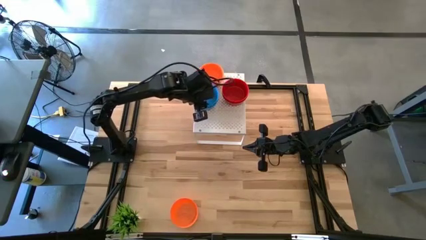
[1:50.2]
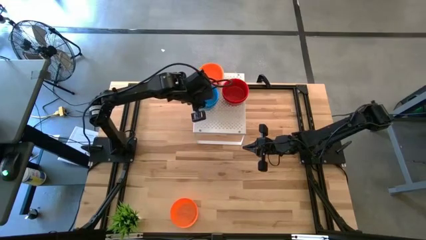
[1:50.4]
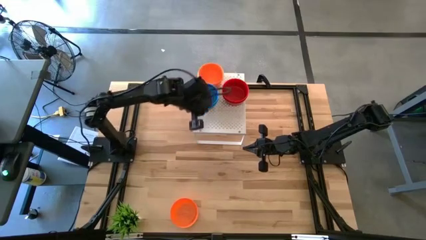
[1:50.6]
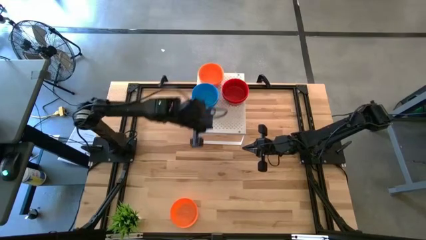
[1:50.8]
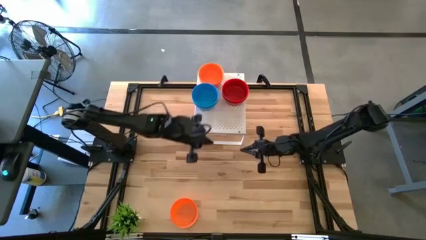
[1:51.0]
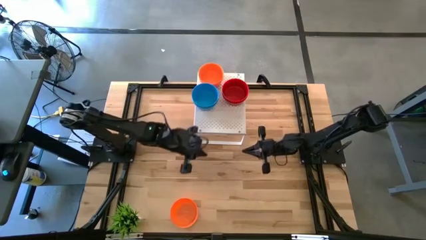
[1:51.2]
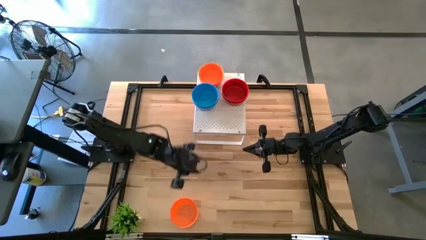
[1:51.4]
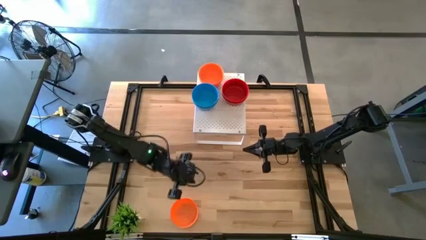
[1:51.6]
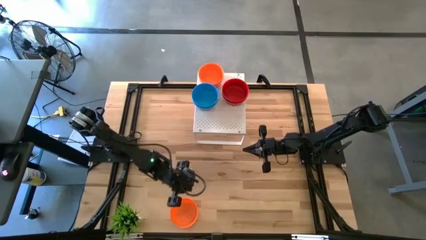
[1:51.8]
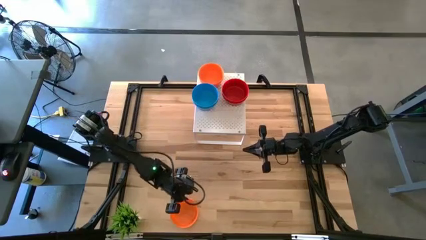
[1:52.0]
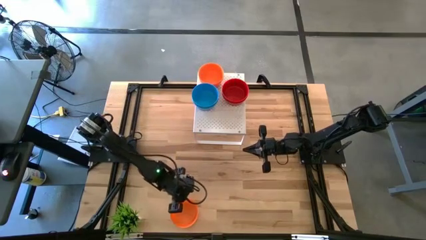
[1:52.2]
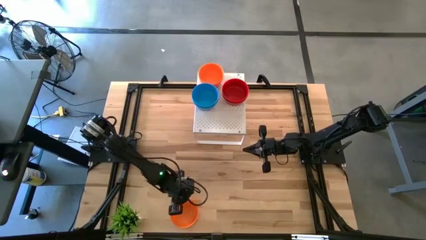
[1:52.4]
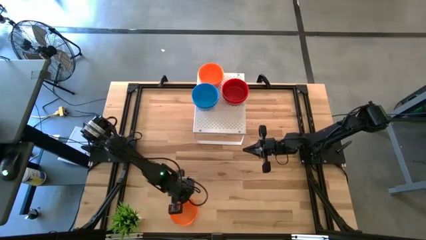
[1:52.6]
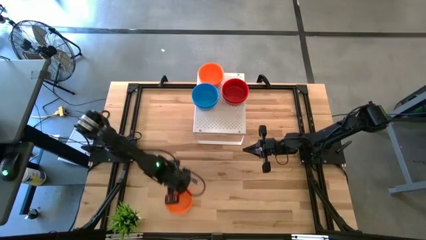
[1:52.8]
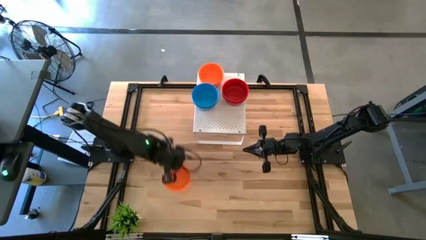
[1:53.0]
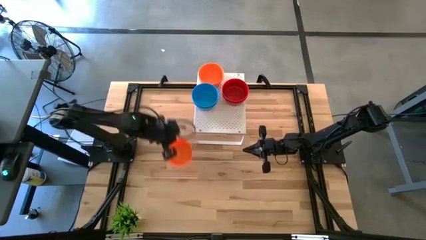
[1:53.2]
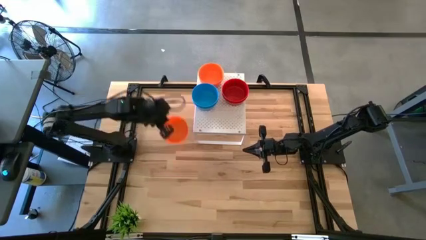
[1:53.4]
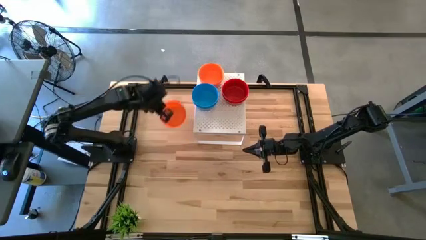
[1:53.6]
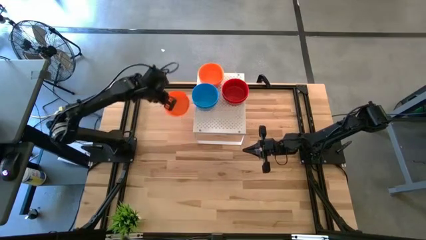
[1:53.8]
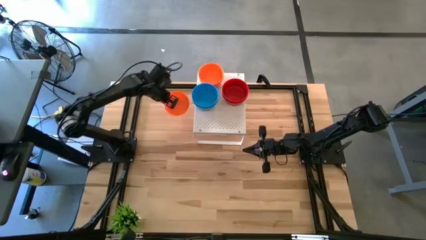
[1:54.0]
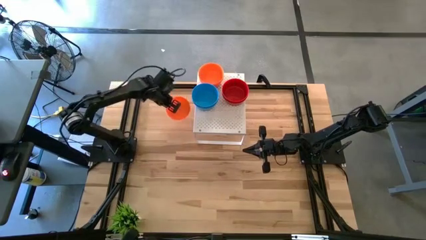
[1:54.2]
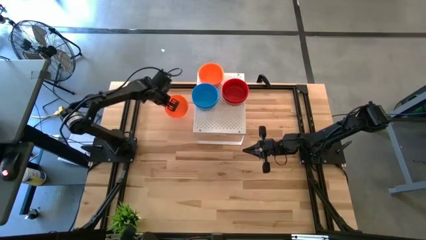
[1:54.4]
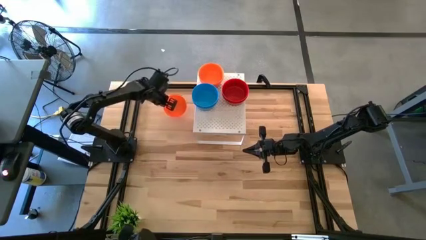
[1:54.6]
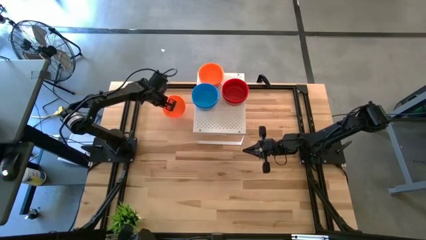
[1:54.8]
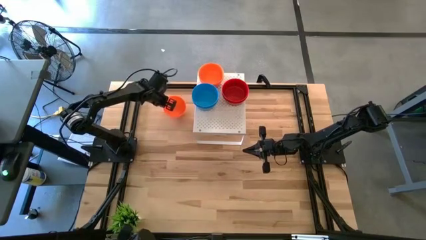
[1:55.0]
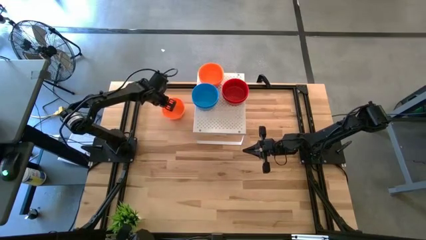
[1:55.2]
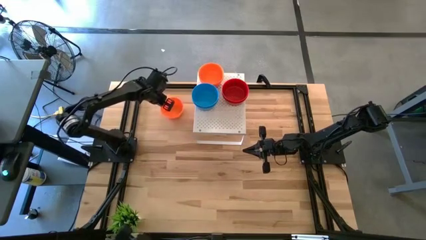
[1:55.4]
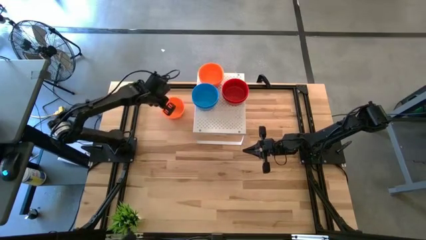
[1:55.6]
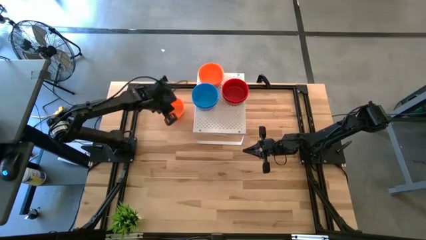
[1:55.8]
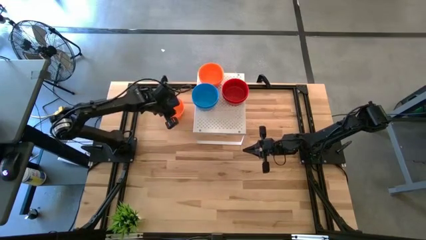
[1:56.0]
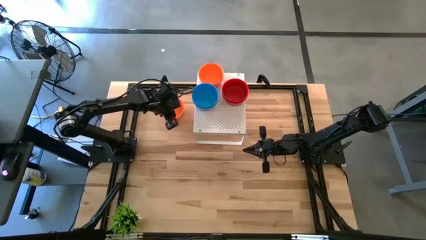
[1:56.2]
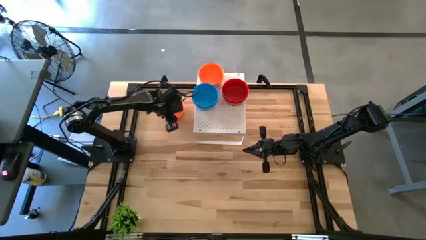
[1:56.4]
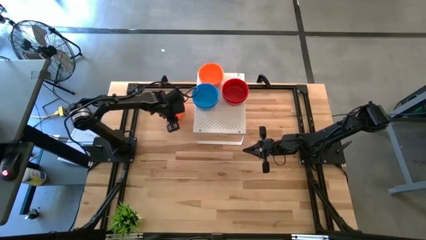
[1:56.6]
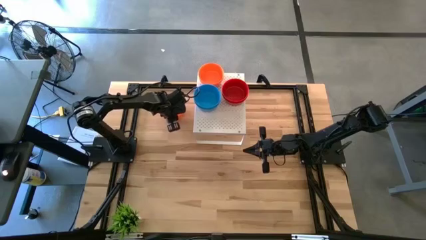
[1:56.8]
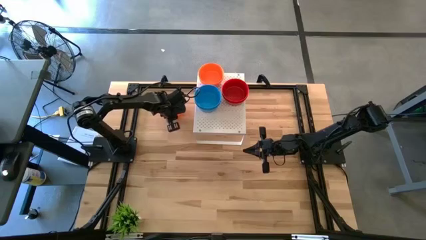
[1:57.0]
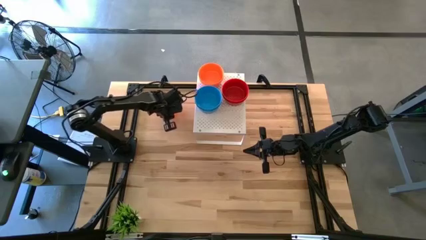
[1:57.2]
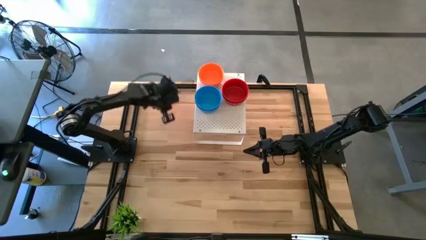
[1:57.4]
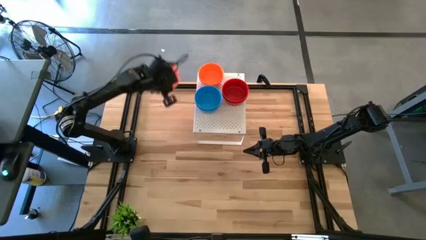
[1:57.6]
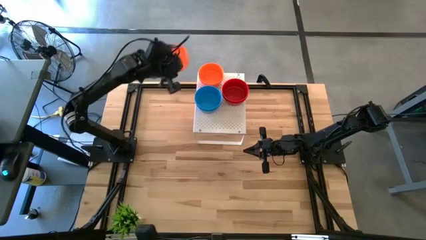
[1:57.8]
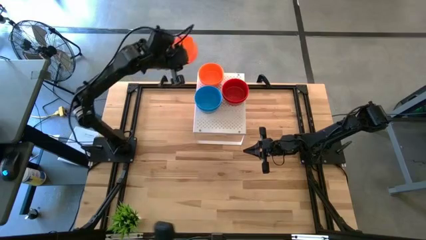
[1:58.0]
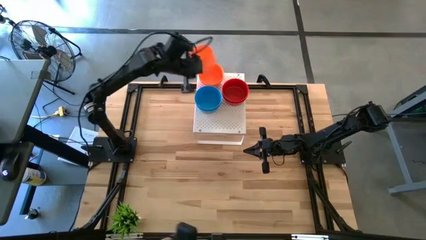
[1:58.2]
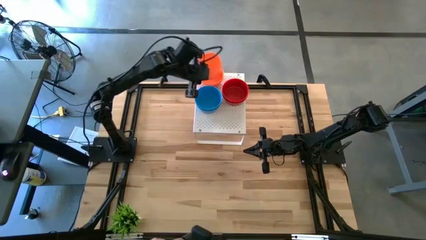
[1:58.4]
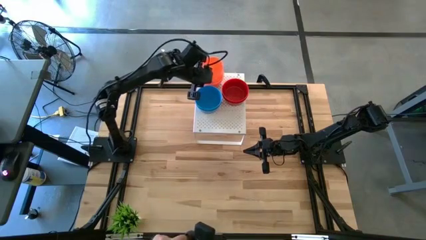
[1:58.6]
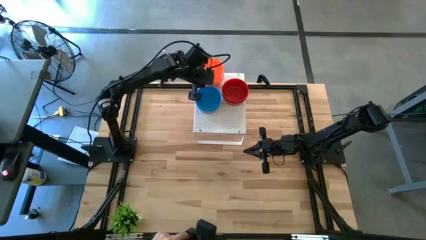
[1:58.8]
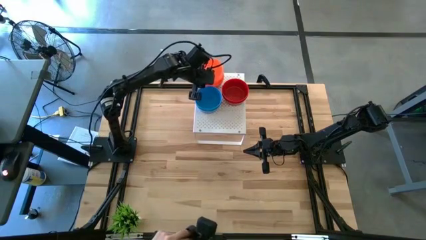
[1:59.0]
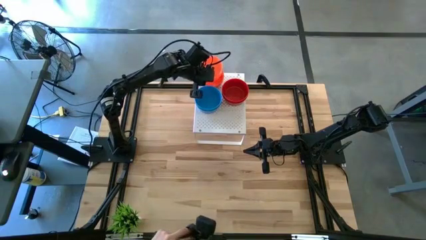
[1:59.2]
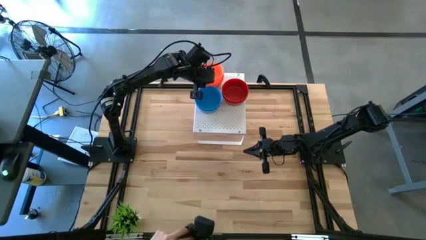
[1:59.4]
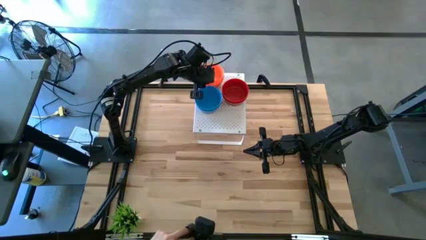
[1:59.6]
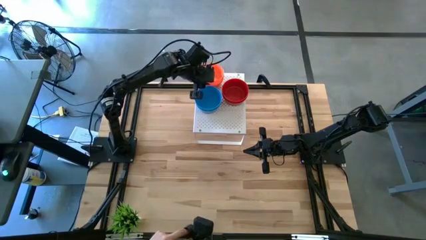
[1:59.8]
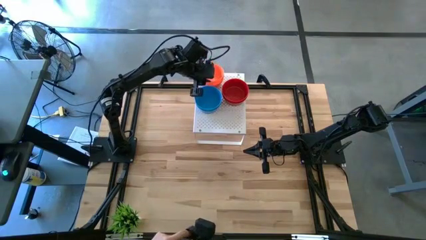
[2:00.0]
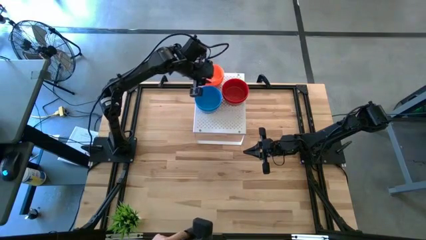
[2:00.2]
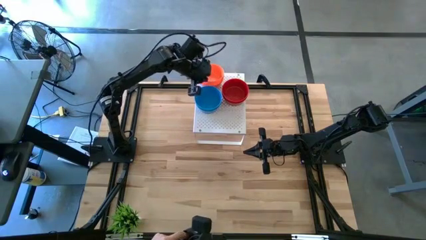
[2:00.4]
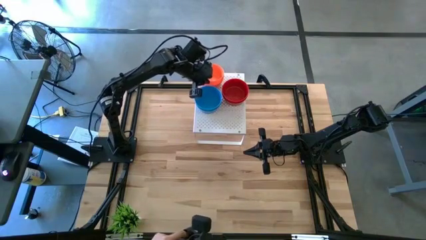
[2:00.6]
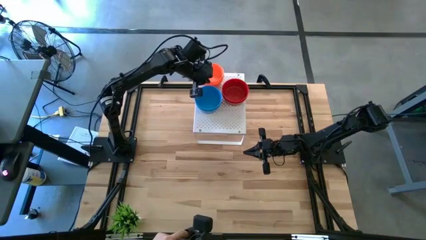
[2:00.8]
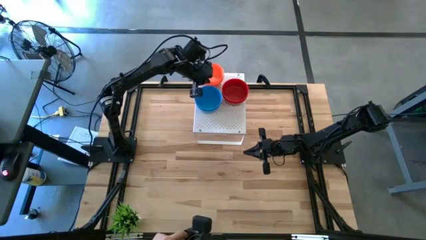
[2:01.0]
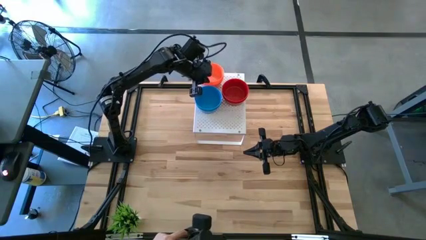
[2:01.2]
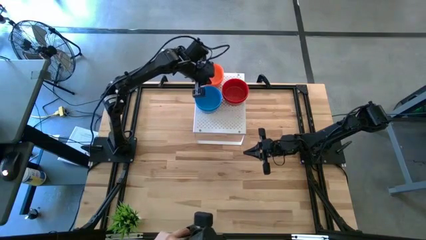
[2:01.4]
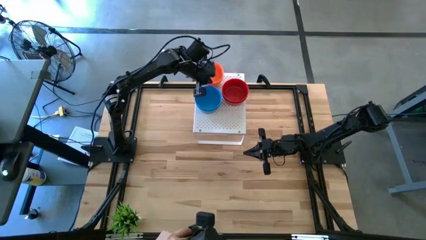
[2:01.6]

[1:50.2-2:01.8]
Task: Pick & Place Mini bowls
Stack the orange bowl on top of the orange bowls on the shelf

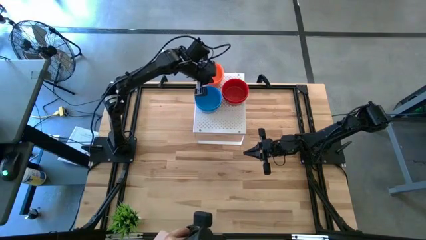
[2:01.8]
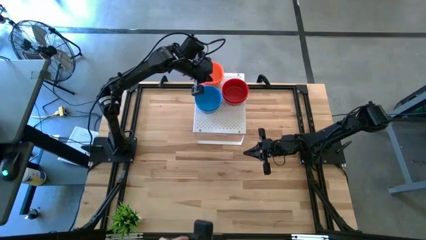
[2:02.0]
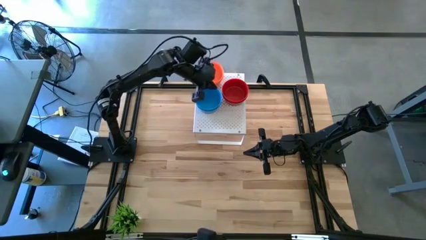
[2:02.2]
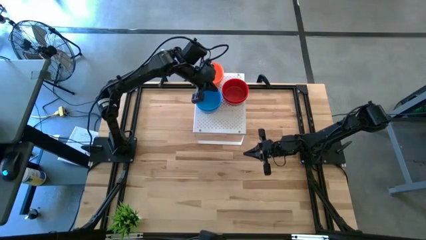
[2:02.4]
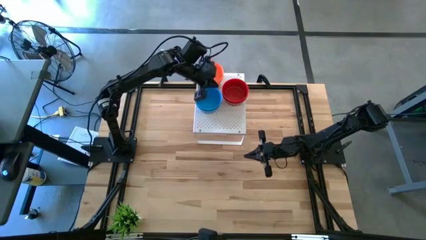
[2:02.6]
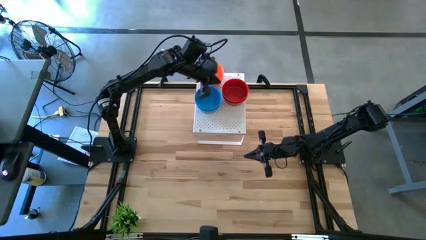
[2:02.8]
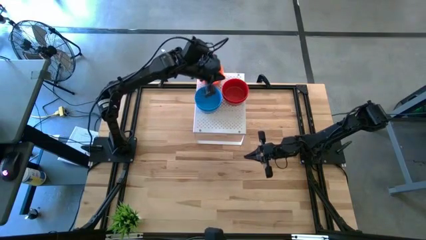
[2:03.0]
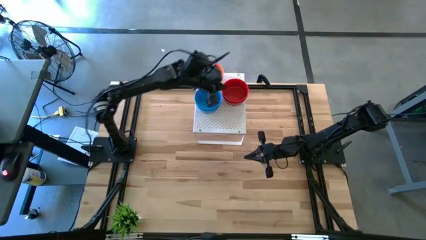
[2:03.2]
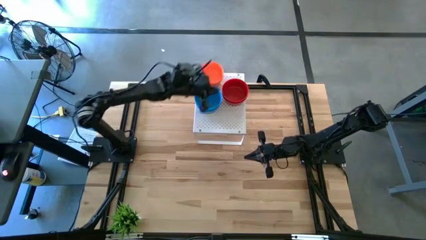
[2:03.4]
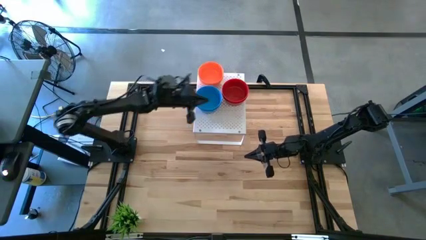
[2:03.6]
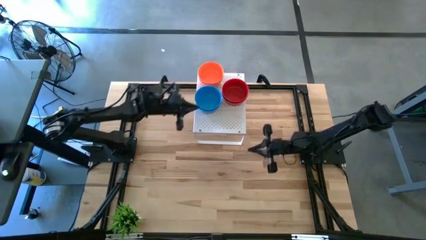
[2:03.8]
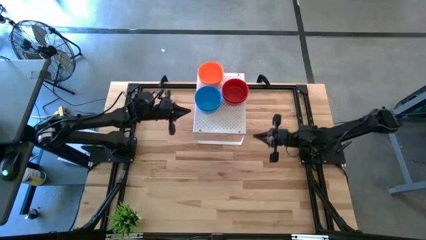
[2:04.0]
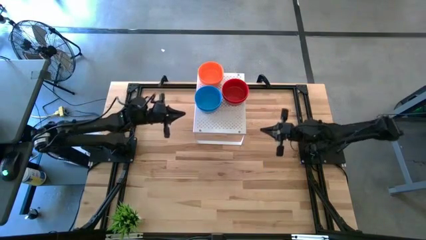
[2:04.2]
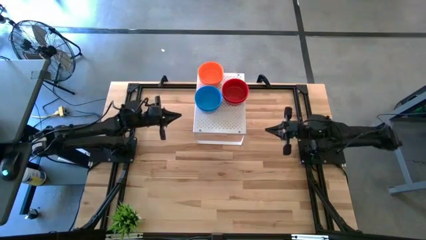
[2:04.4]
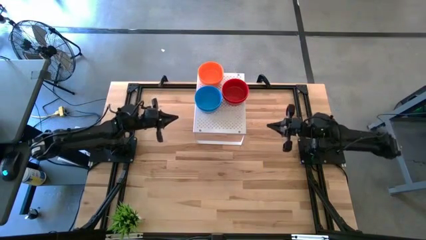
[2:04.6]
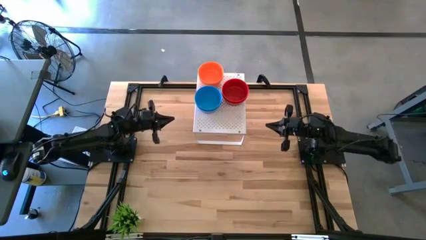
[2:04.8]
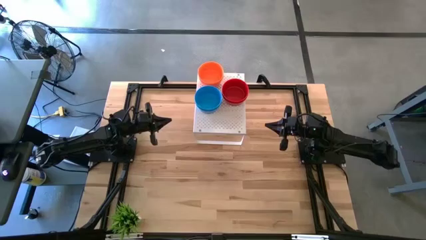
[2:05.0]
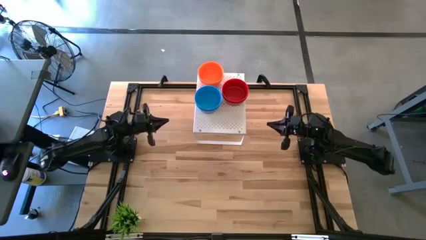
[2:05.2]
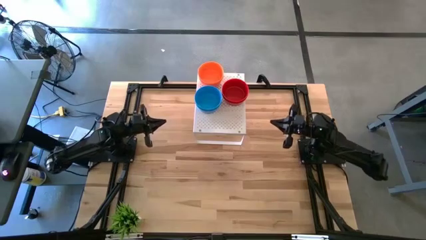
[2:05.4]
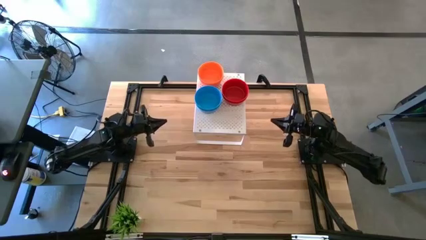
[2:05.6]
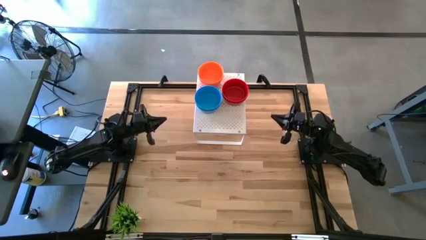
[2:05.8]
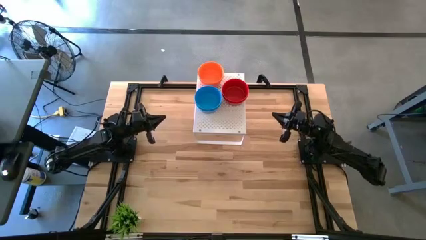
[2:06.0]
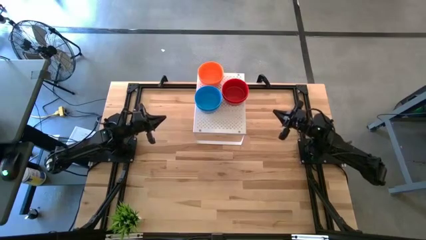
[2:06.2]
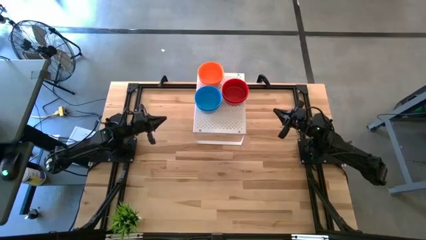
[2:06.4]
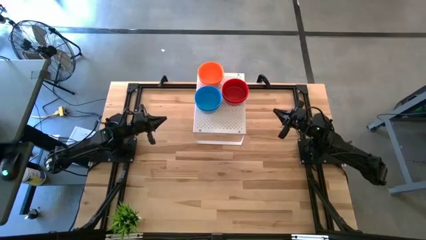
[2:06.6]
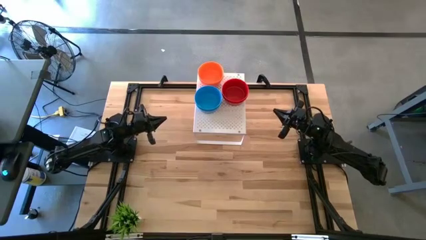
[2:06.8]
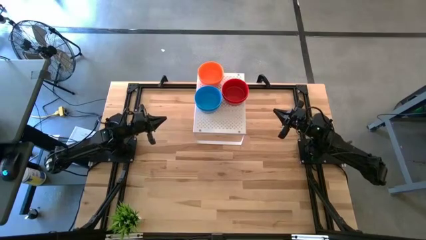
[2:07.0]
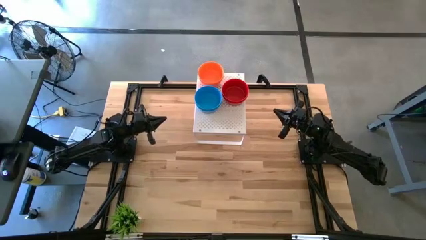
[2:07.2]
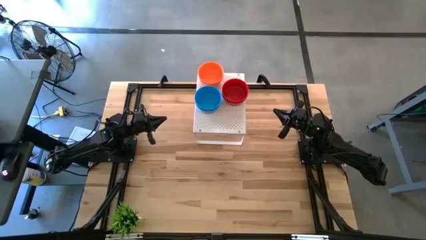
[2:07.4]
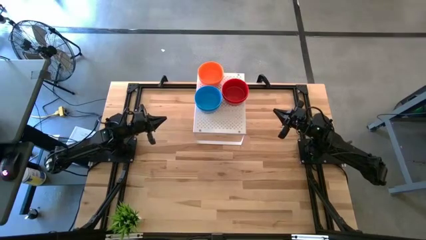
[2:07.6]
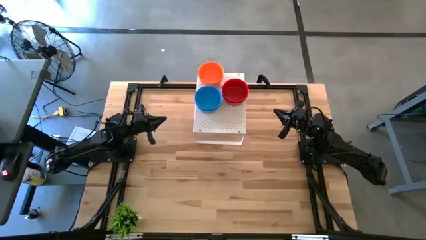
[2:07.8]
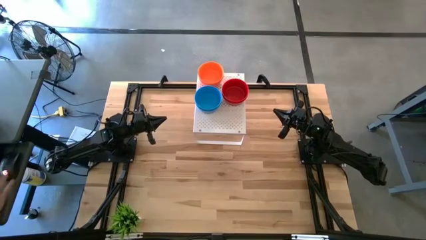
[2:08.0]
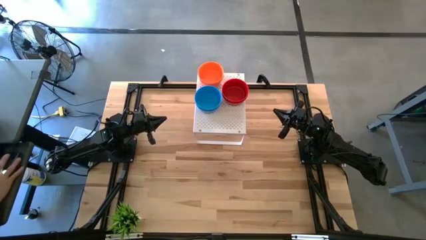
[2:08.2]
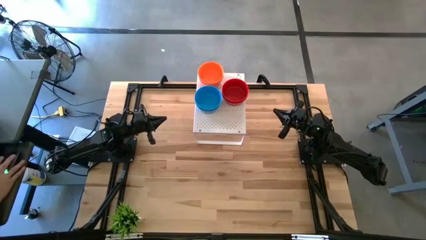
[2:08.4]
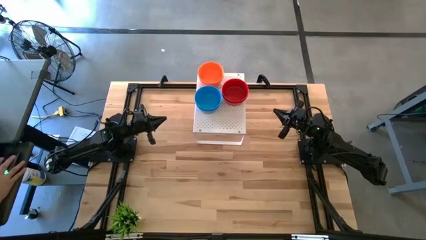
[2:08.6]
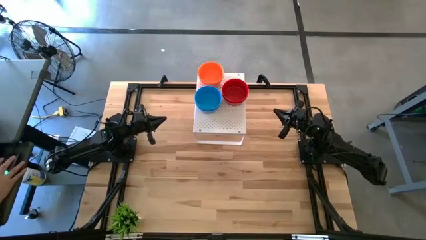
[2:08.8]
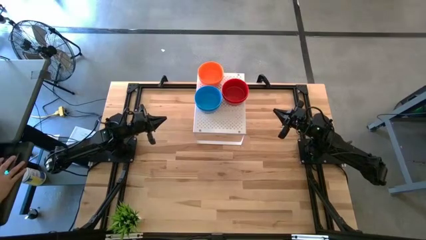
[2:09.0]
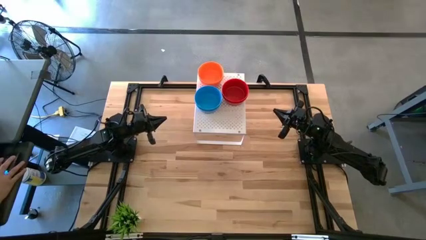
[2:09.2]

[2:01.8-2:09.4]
Return to Home Position
